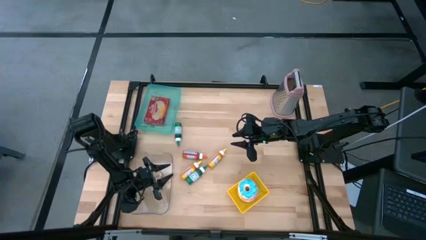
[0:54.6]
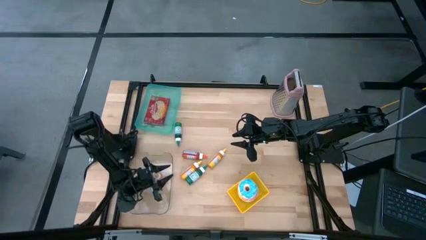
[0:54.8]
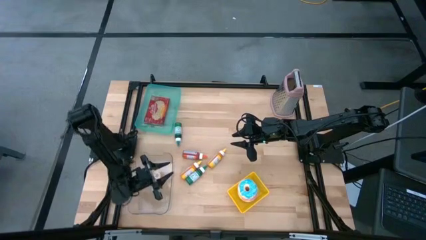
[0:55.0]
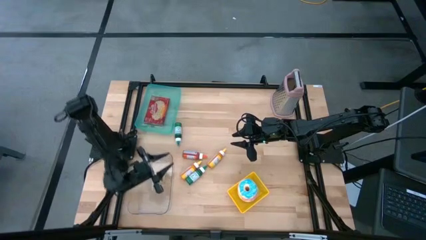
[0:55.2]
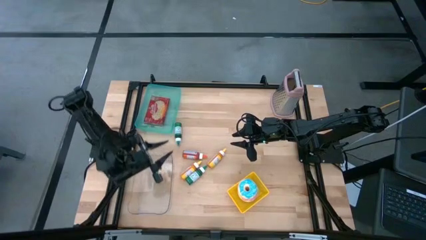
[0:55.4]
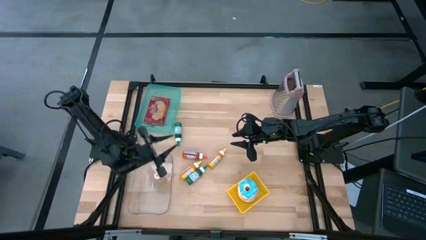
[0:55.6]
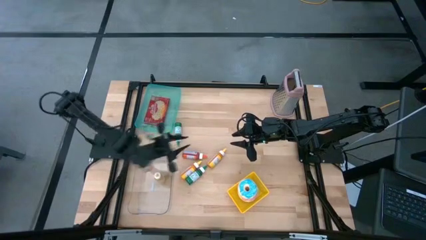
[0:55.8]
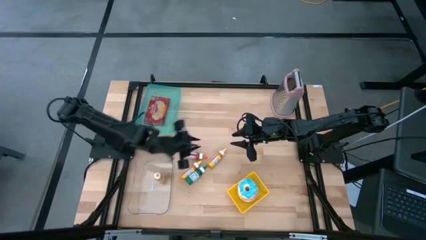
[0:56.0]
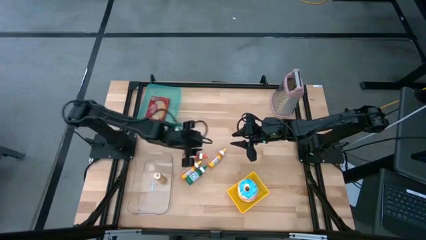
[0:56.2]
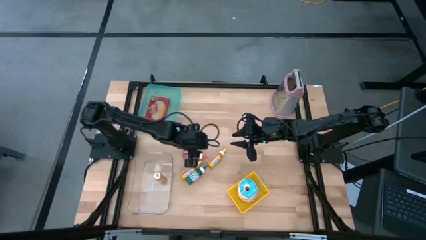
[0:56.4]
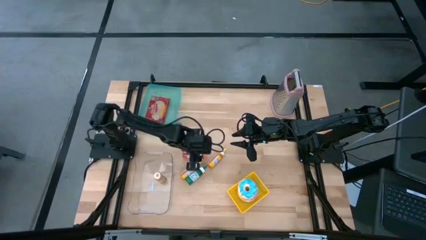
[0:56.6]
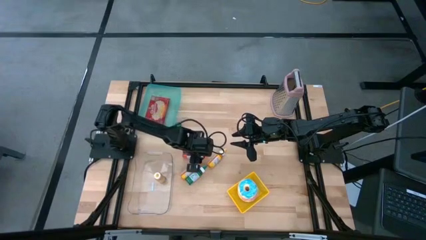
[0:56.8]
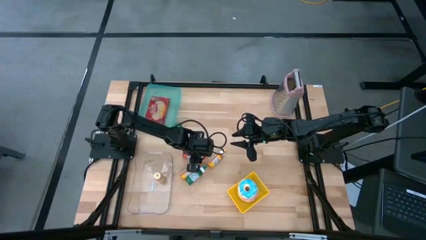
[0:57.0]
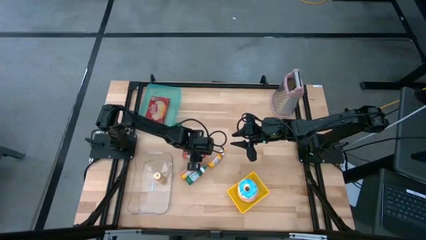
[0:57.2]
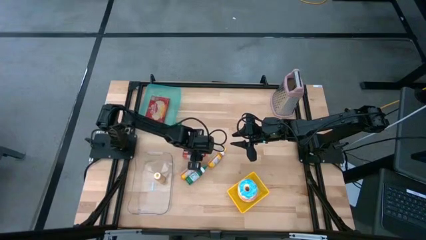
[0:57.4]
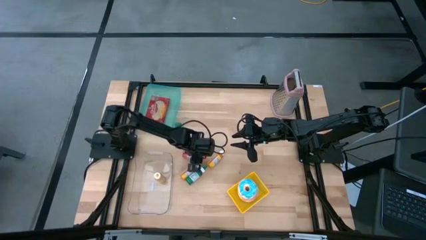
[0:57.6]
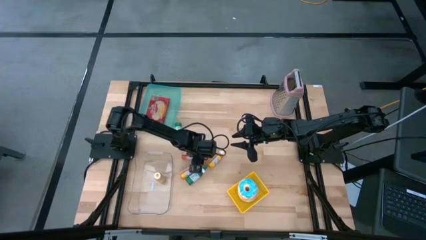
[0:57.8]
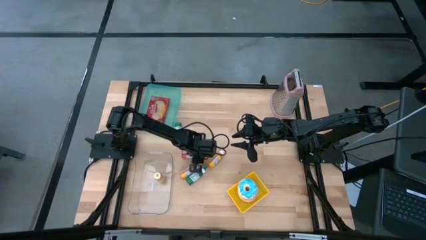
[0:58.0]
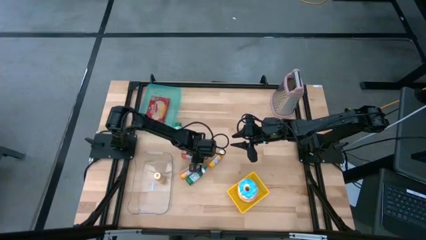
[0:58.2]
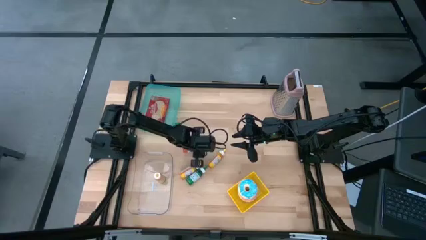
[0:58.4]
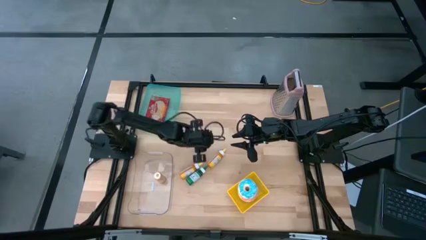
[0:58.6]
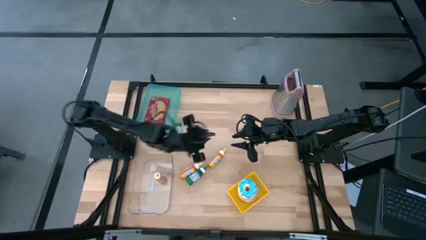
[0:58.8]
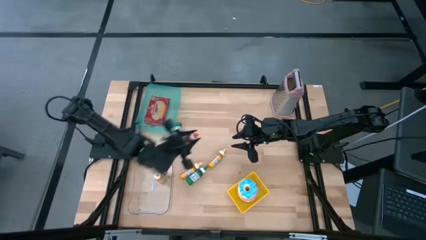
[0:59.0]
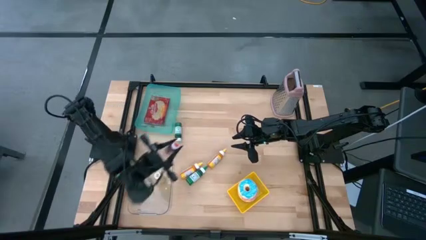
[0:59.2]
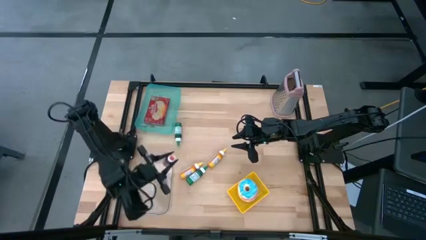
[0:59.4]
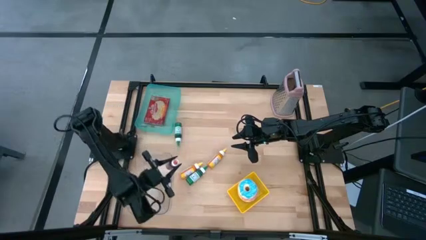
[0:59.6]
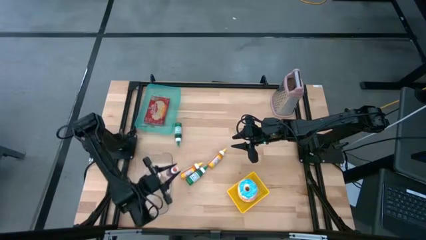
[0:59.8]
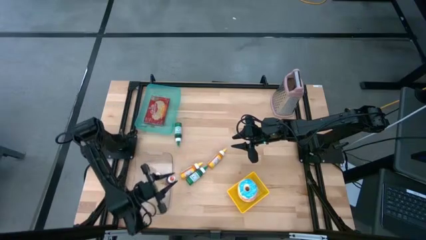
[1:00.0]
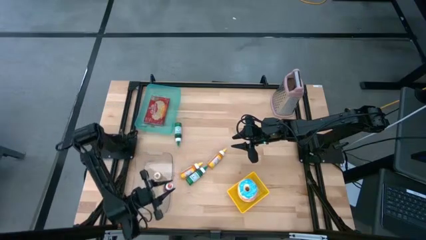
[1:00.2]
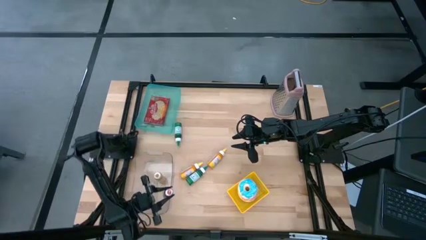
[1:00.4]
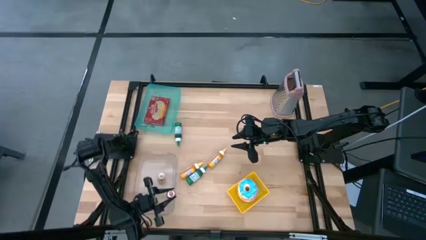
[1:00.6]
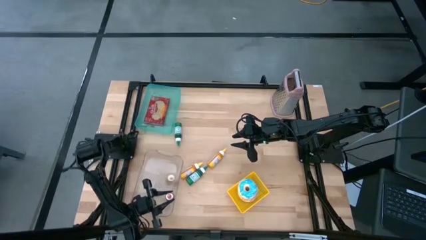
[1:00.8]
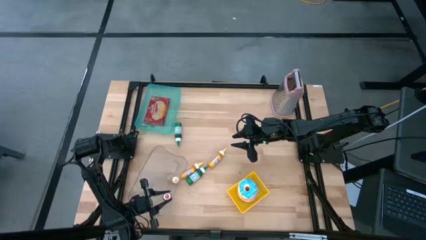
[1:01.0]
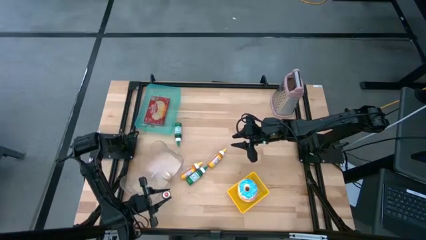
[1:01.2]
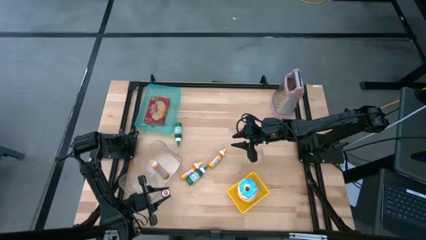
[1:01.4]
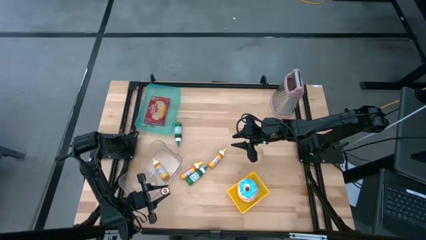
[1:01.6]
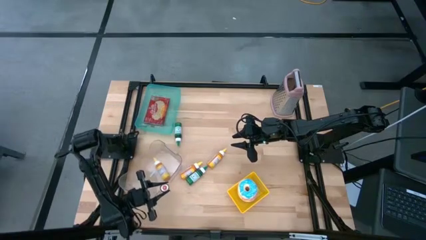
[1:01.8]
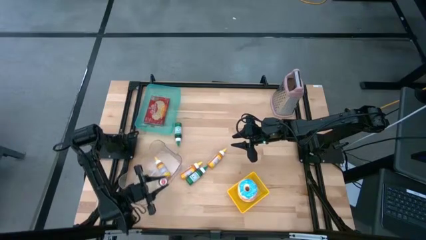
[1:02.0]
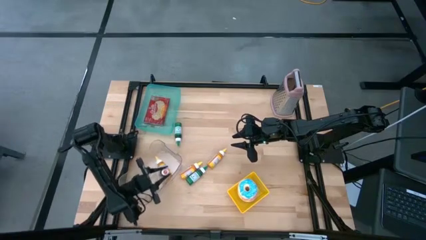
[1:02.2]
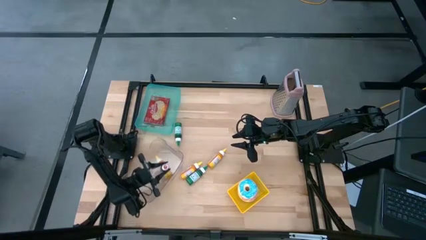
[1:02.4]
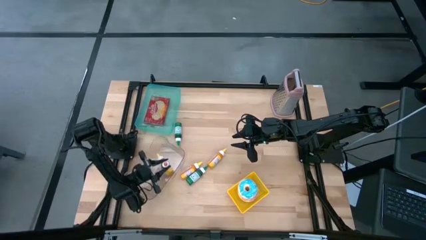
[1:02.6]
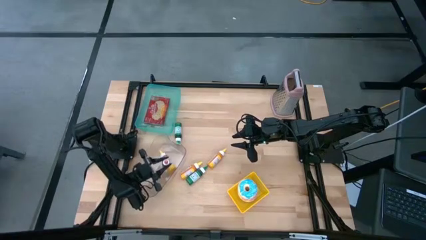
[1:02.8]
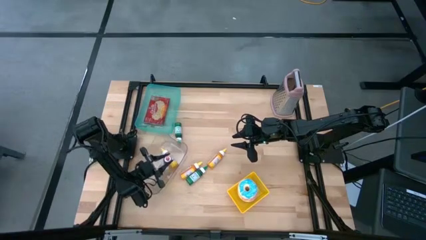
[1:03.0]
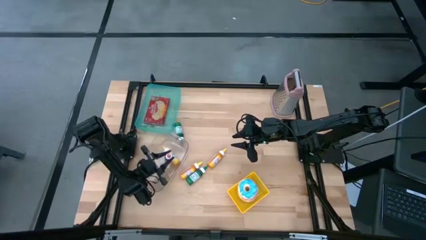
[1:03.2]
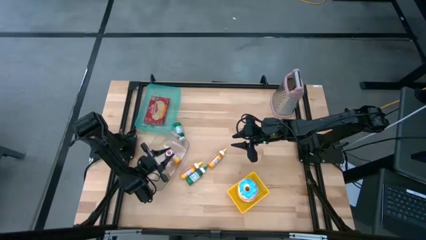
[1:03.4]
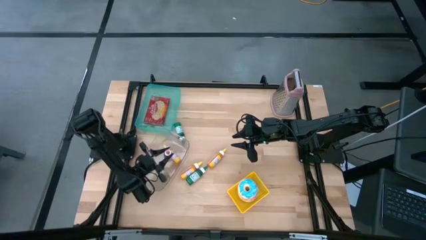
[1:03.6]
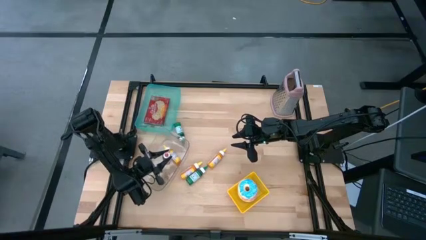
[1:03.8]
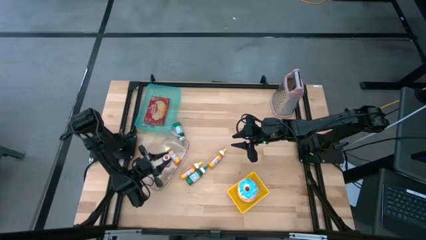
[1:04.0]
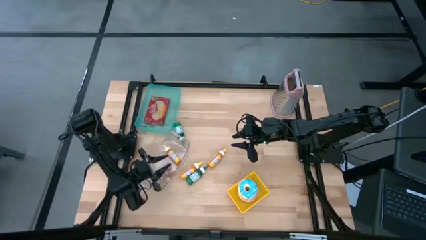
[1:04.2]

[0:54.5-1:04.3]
Put the orange food coloring bottle into the transparent bin

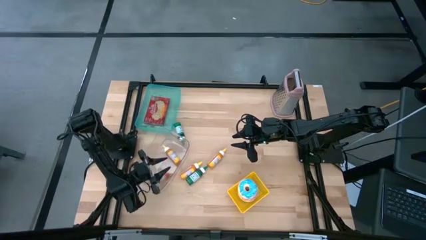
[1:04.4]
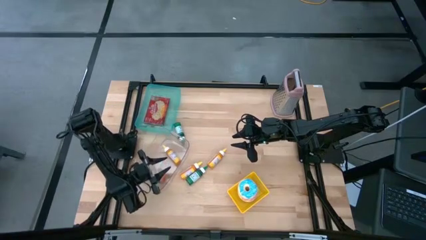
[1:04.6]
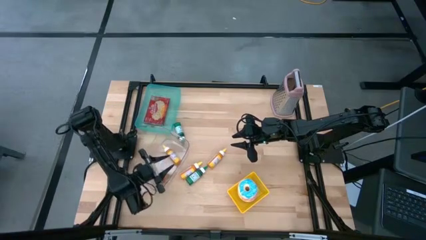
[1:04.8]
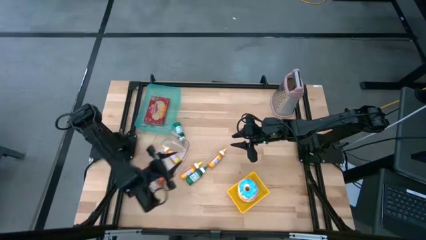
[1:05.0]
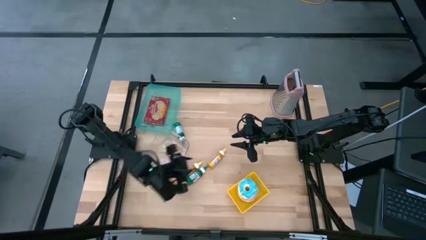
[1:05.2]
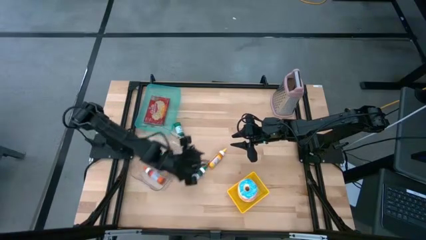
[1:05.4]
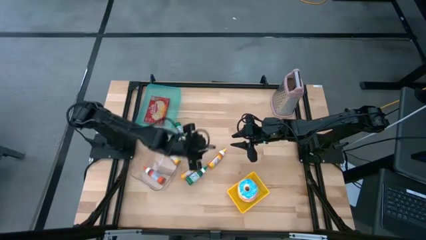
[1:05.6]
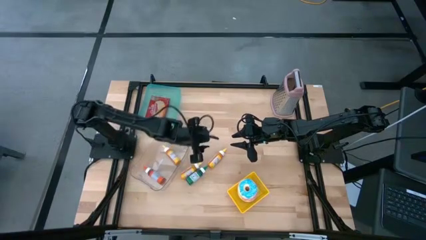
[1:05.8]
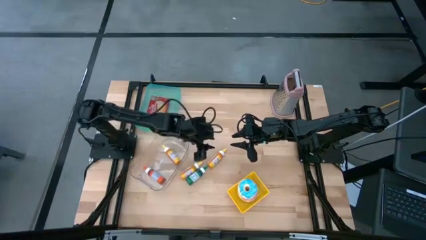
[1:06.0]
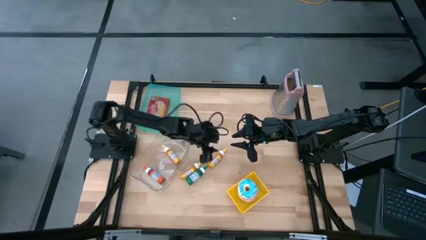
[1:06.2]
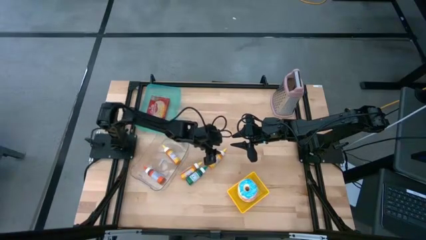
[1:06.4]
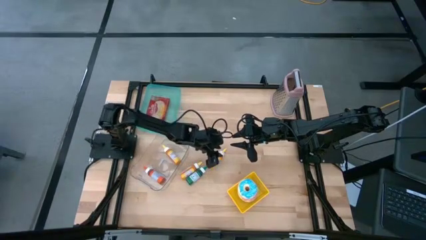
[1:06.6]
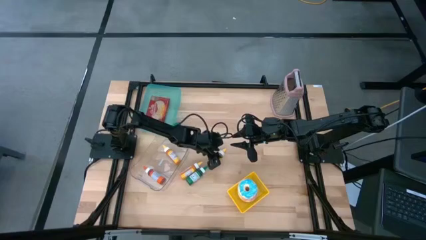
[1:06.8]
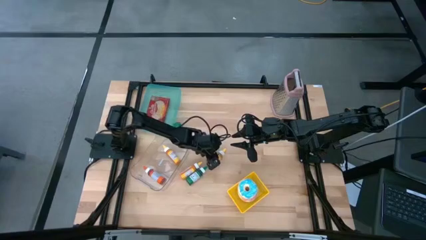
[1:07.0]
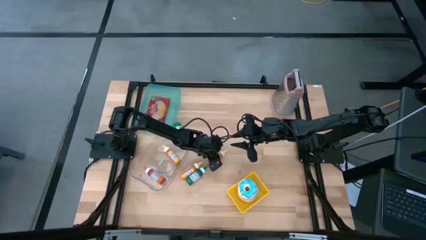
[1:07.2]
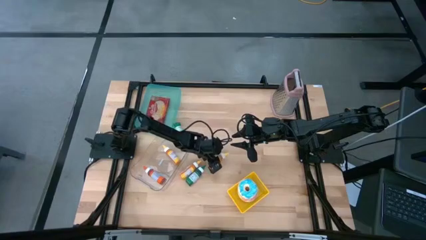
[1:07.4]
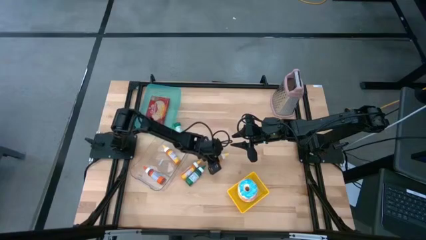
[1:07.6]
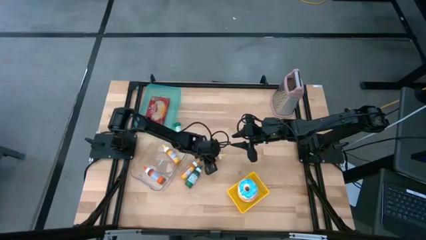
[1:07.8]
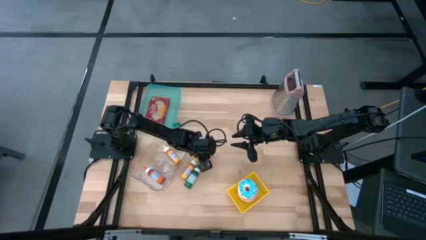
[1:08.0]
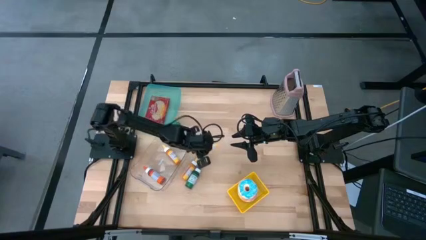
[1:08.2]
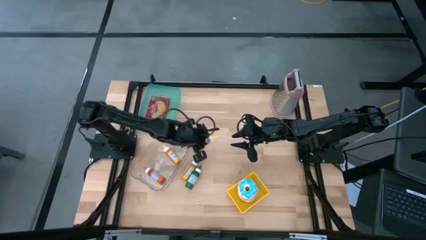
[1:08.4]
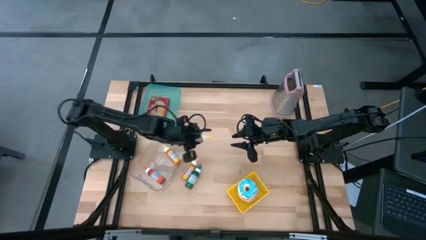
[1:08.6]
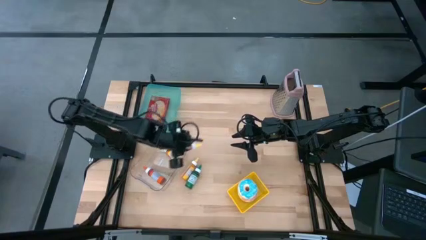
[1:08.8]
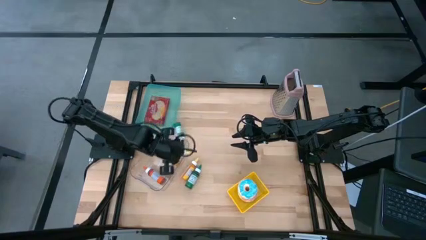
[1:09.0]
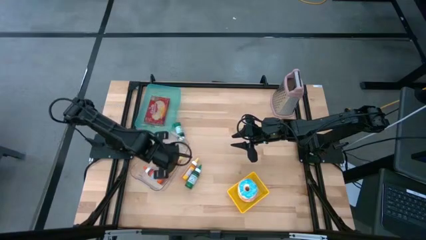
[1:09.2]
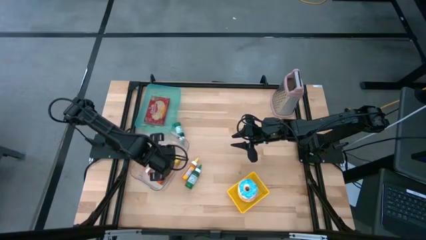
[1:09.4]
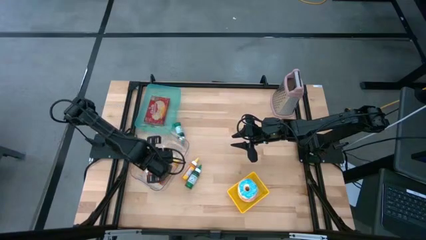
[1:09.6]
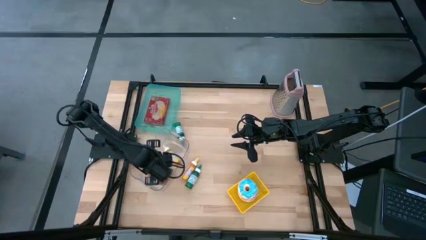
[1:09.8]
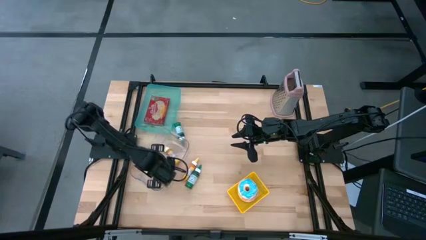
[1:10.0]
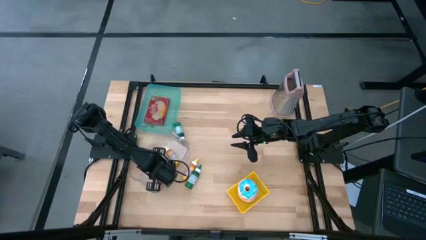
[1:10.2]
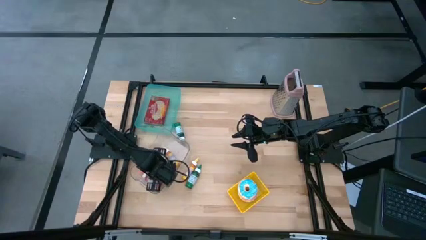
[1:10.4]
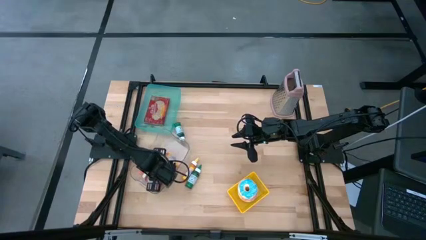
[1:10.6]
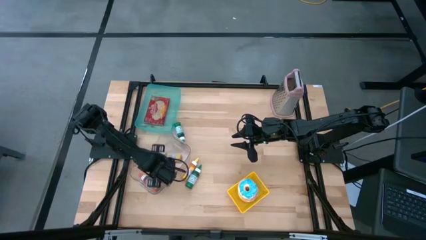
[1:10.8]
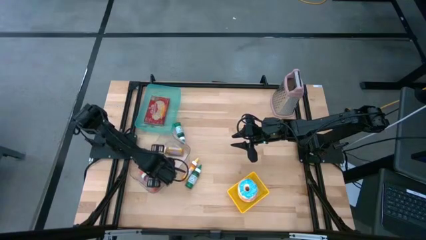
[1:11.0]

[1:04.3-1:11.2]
Put the right yellow food coloring bottle into the transparent bin
